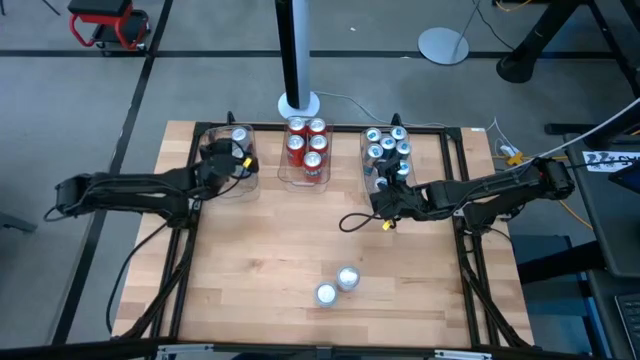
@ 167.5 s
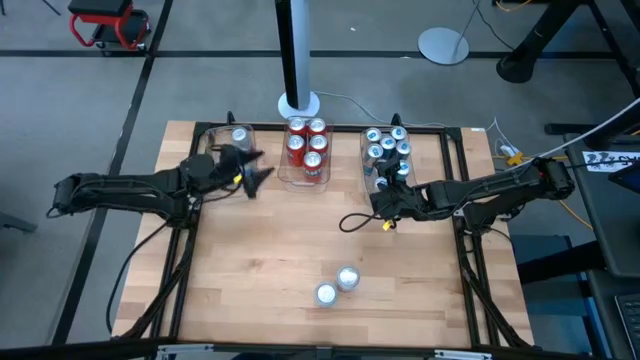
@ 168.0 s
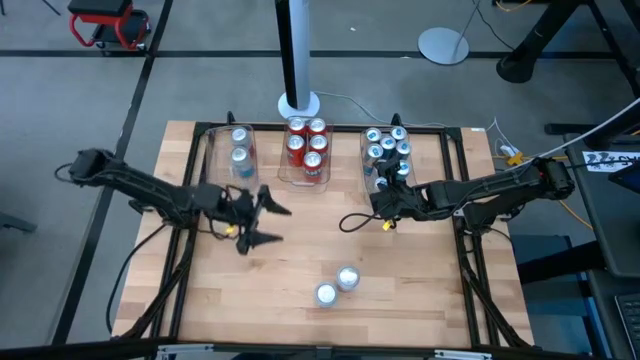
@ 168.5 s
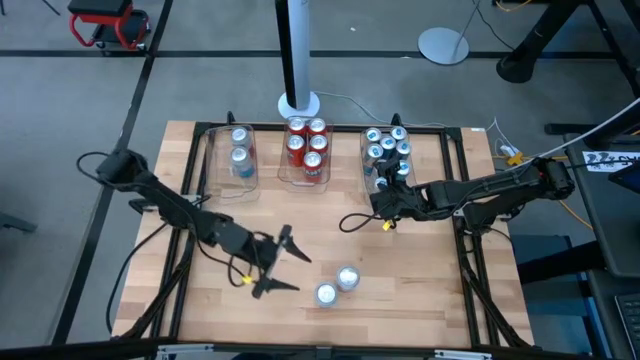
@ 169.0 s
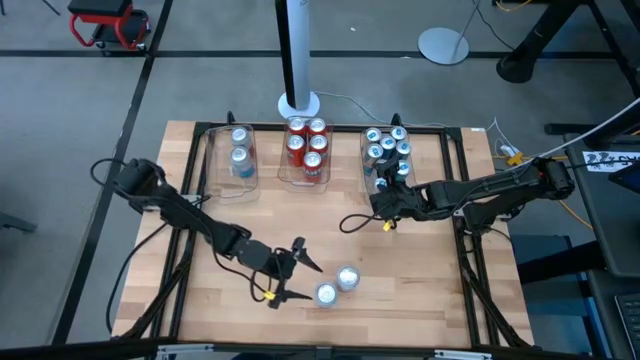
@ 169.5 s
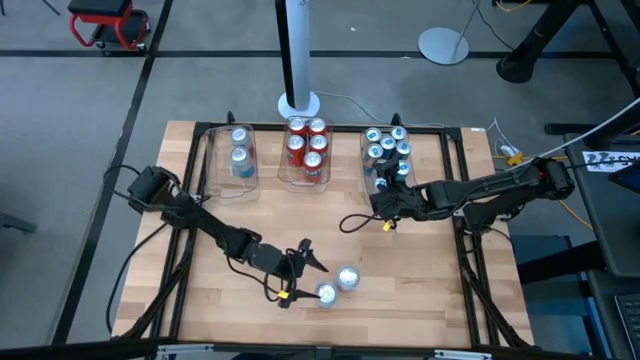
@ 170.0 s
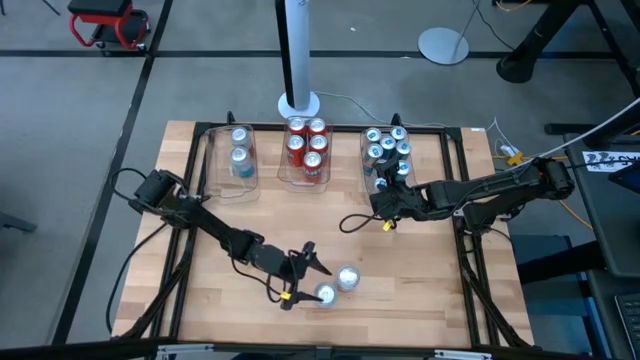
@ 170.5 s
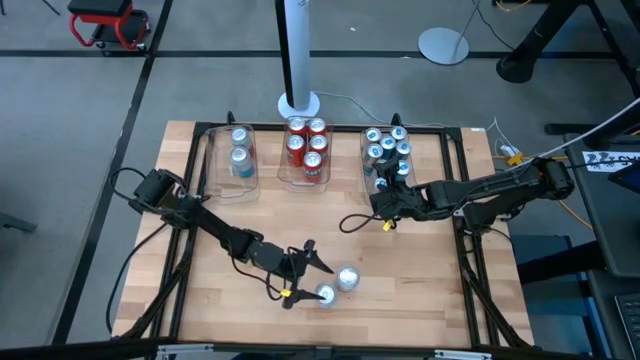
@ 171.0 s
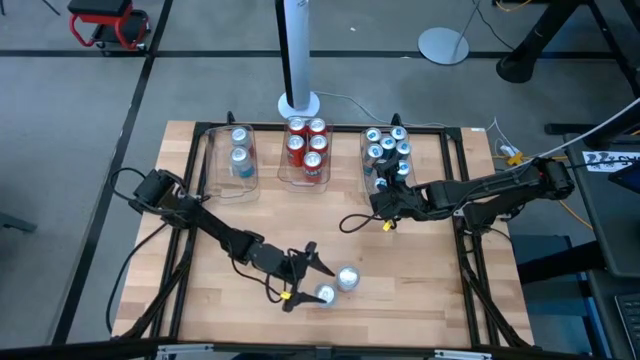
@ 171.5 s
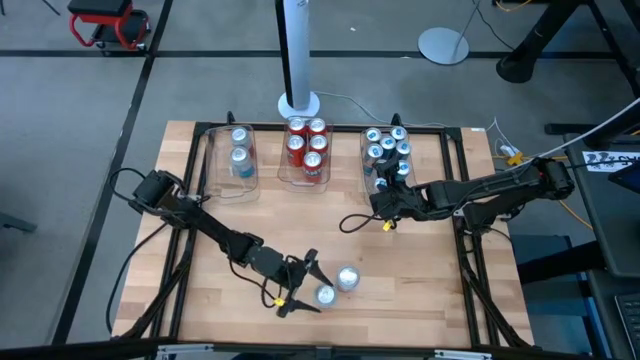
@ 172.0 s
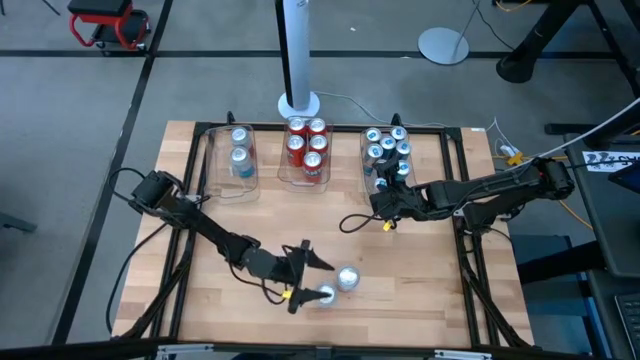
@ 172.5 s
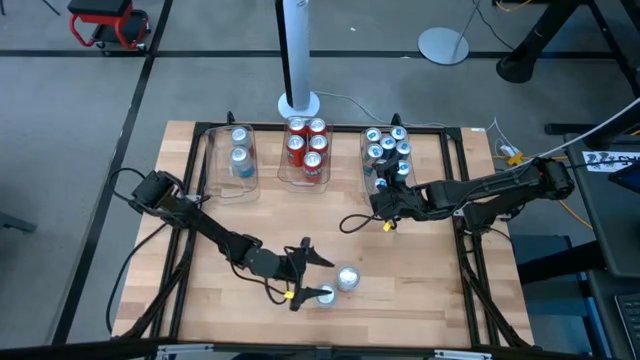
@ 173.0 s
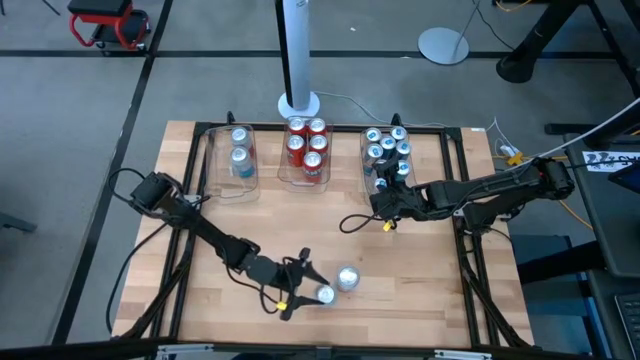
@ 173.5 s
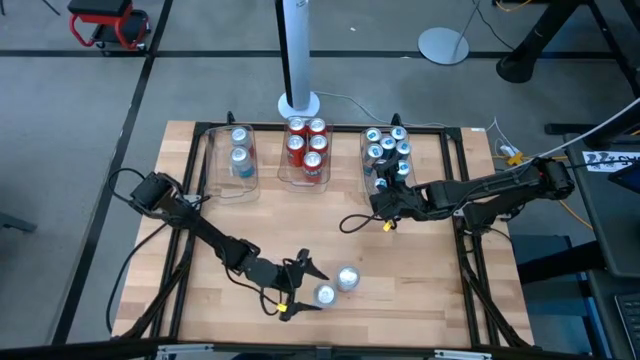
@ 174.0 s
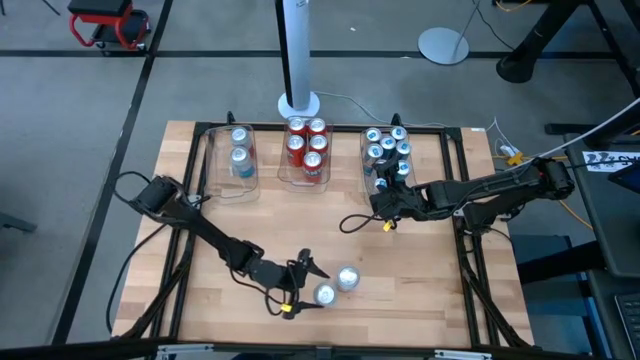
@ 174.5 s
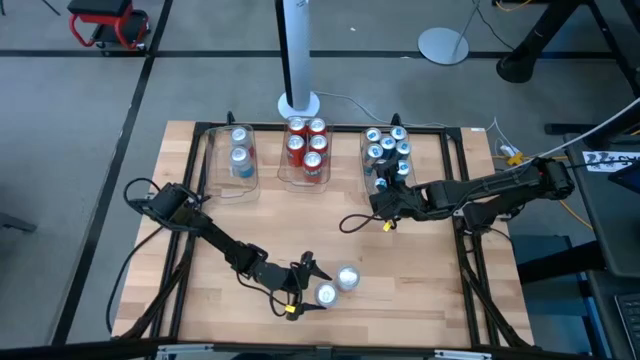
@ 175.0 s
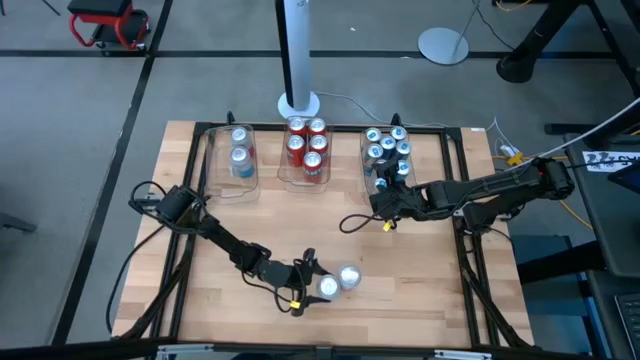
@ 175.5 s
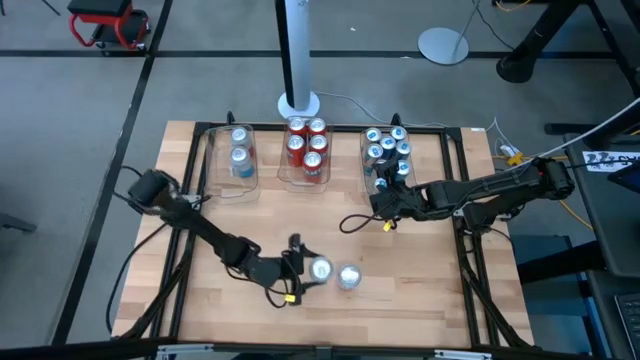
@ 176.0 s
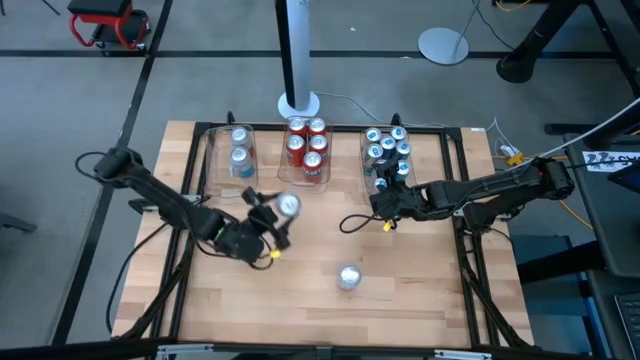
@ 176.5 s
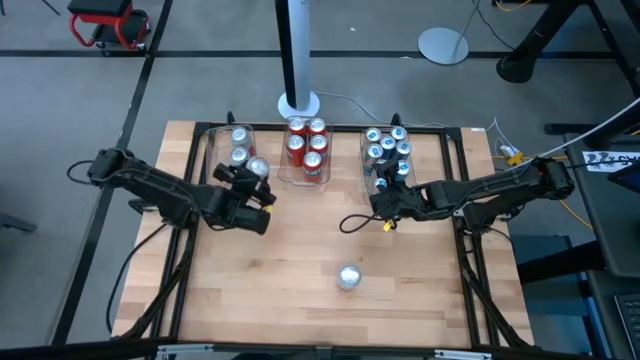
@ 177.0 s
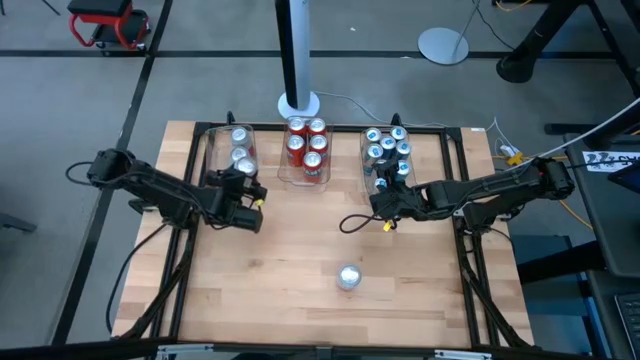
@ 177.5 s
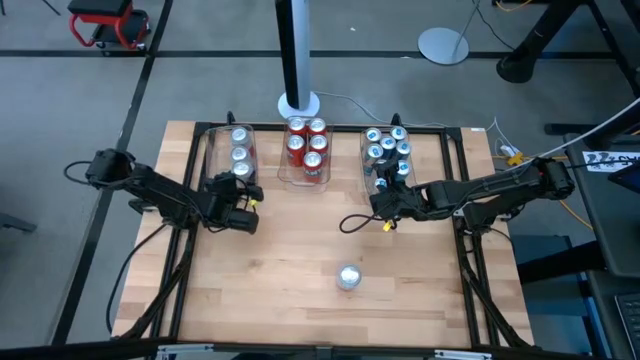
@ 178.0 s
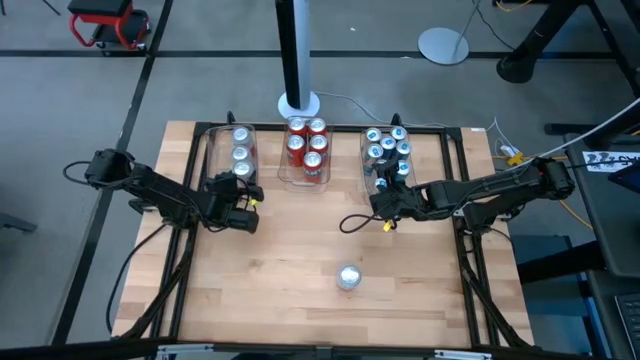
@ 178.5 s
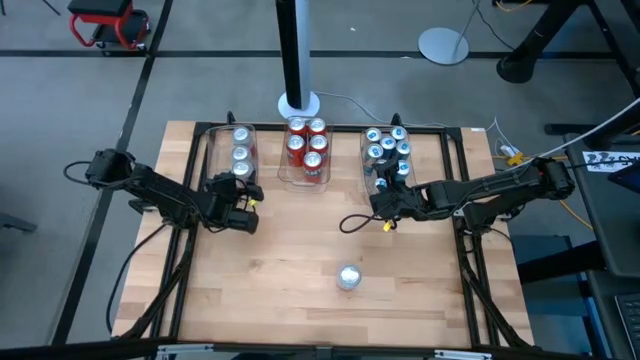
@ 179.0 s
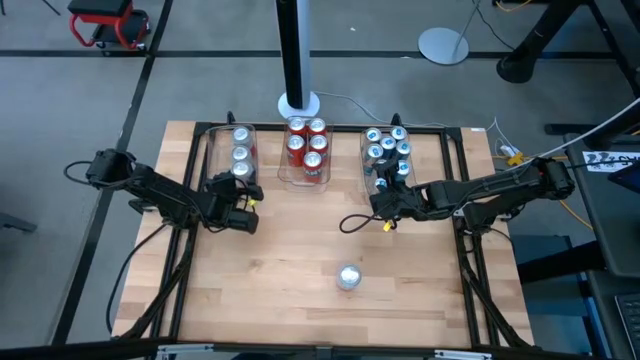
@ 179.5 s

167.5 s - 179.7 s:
Task: Sort soda cans
Put the orange-white soda can into the top left transparent bin

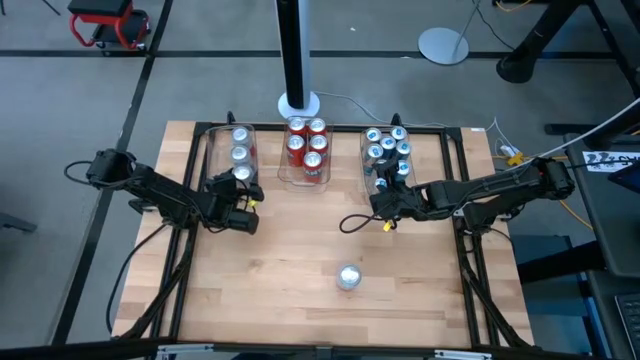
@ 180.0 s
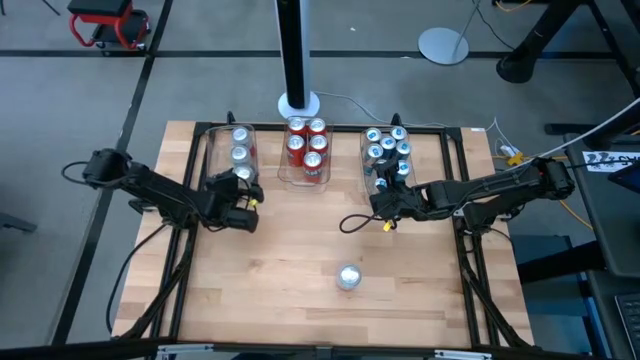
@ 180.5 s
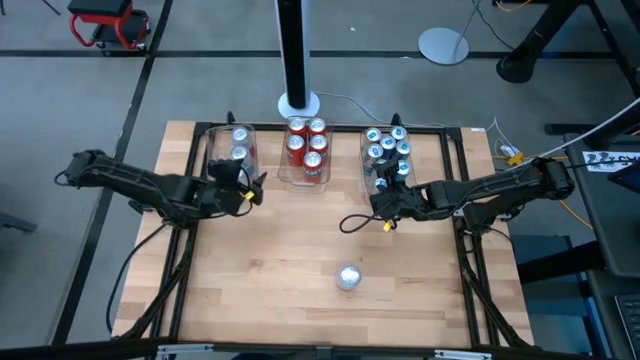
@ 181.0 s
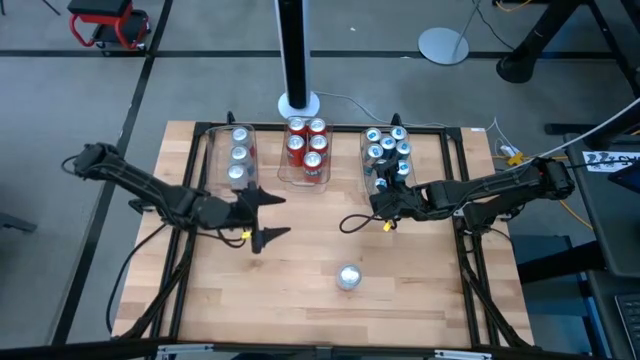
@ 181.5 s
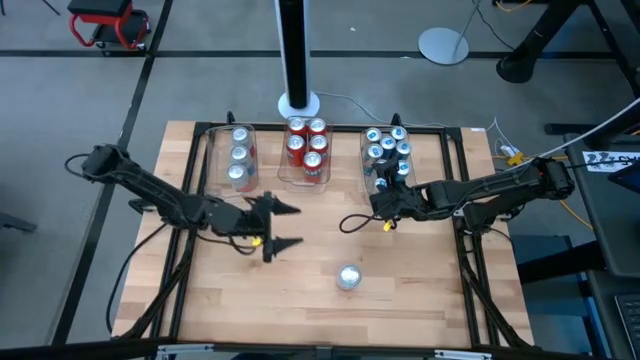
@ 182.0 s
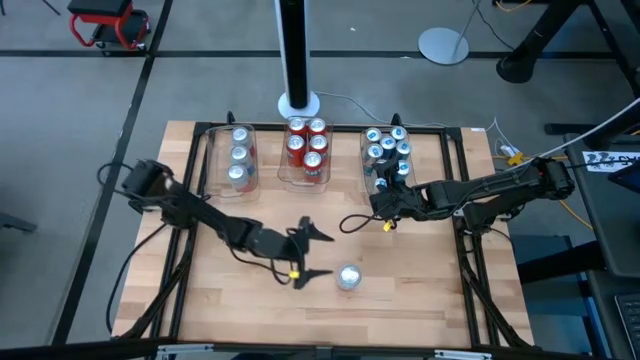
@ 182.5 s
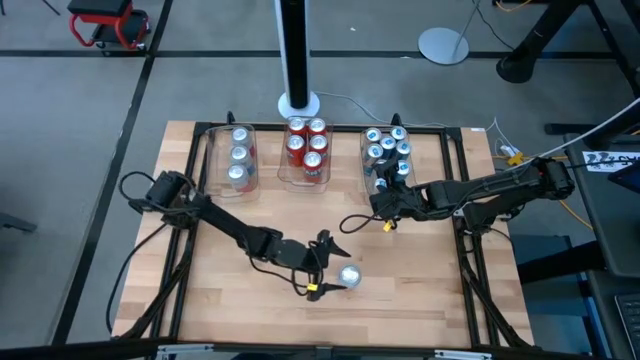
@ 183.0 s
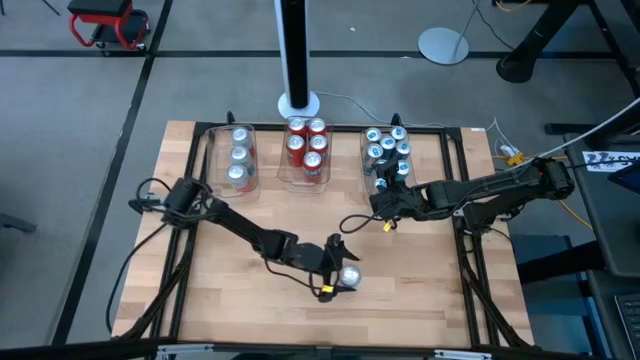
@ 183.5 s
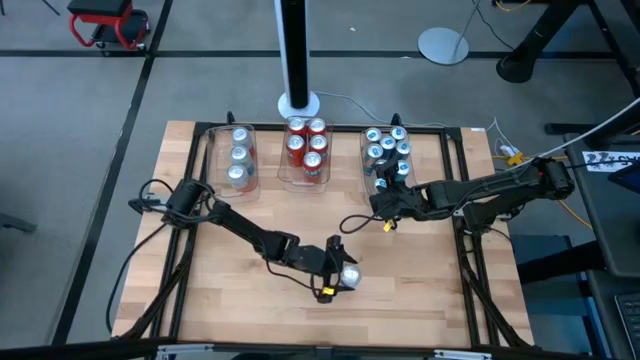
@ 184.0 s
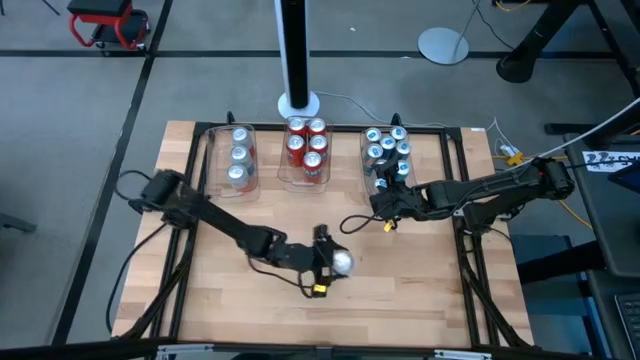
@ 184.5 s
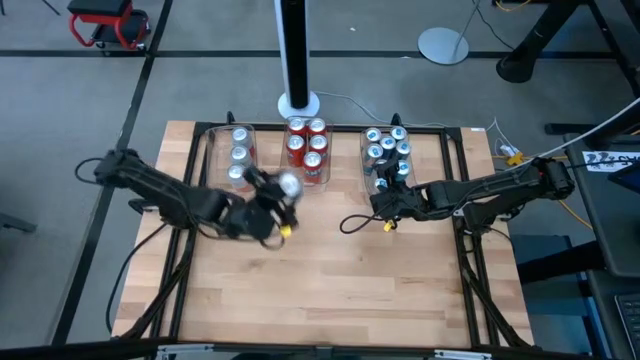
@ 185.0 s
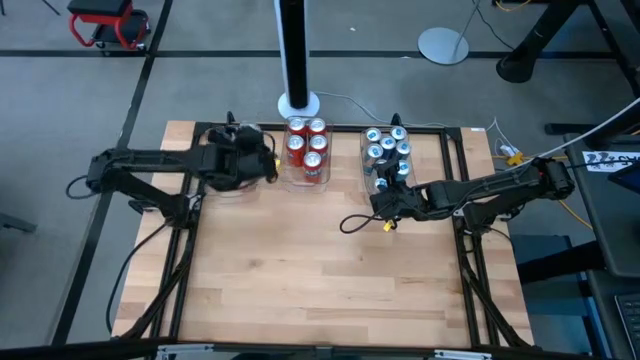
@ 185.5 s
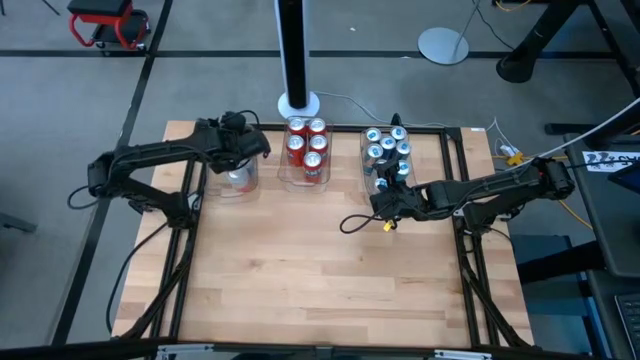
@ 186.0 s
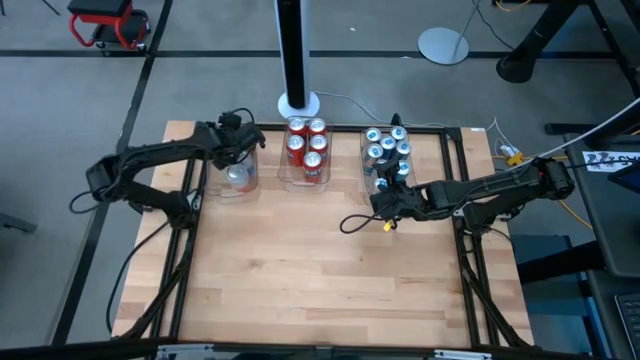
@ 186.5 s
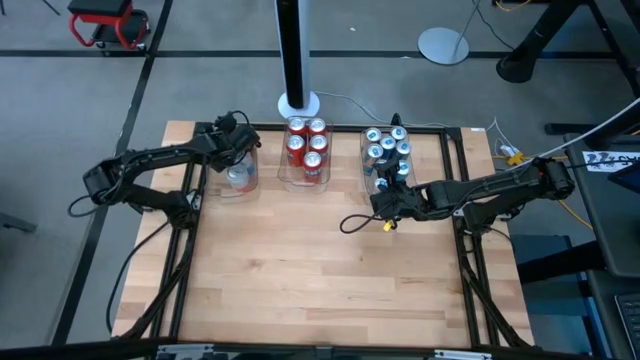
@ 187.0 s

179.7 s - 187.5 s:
Put the pink-white soda can into the top left transparent bin
